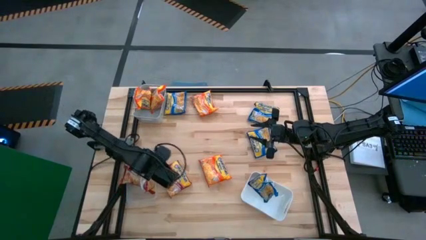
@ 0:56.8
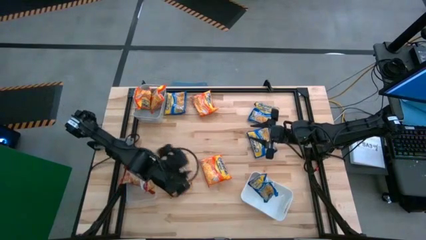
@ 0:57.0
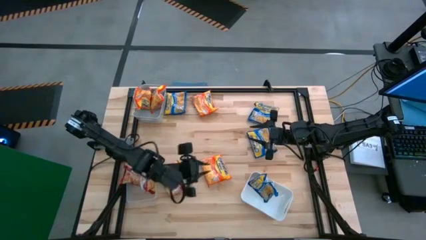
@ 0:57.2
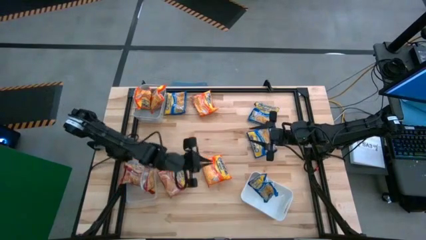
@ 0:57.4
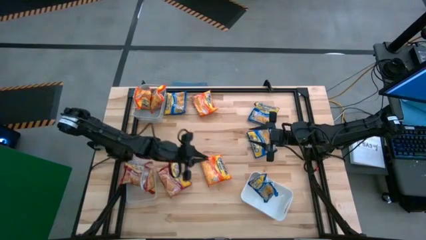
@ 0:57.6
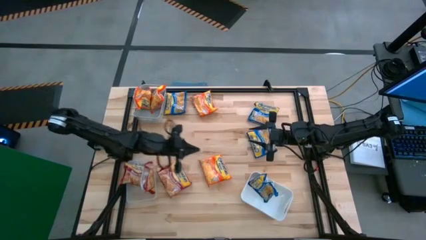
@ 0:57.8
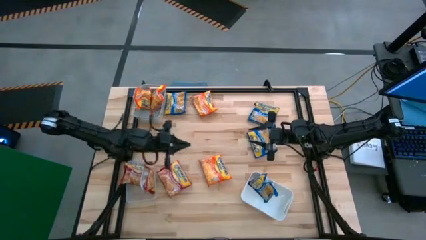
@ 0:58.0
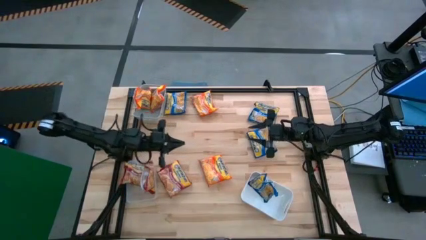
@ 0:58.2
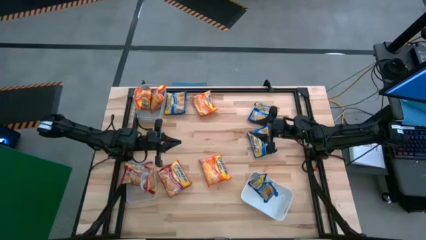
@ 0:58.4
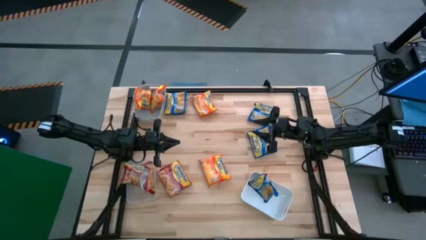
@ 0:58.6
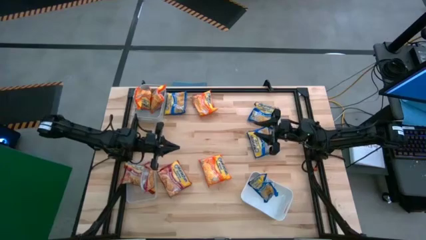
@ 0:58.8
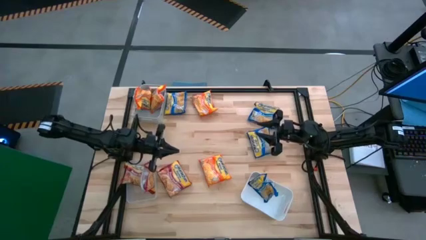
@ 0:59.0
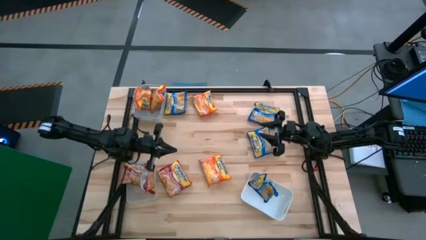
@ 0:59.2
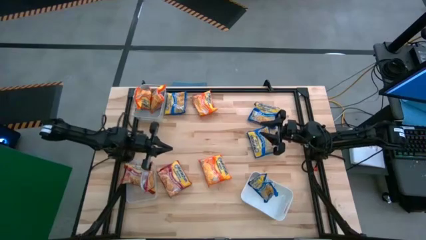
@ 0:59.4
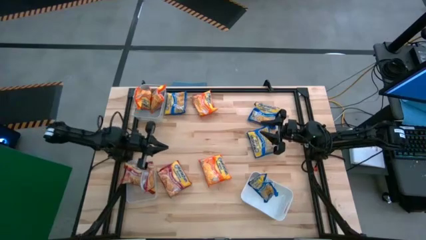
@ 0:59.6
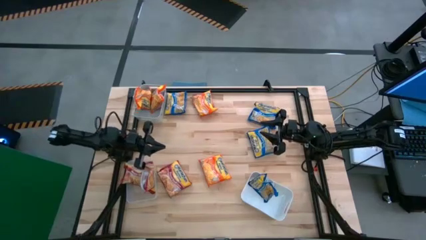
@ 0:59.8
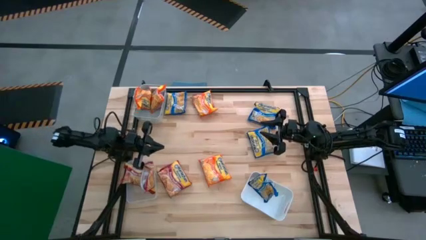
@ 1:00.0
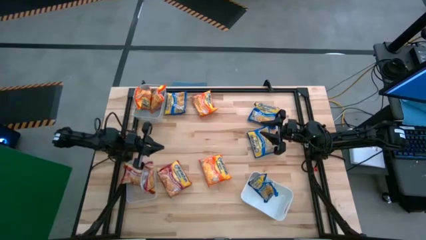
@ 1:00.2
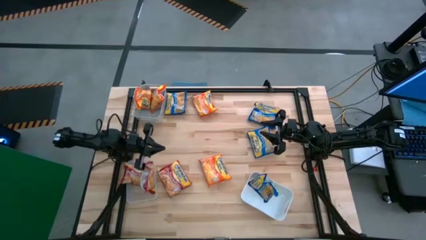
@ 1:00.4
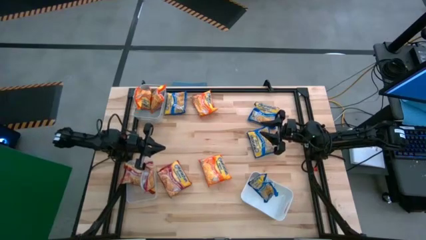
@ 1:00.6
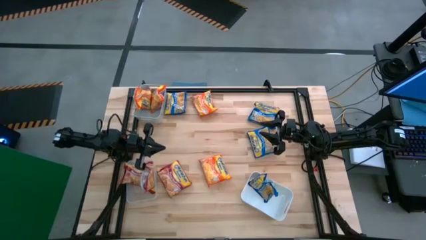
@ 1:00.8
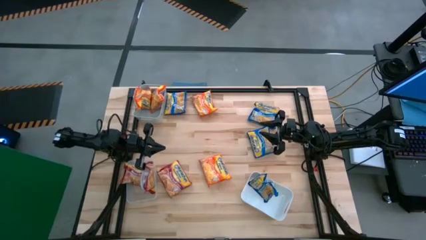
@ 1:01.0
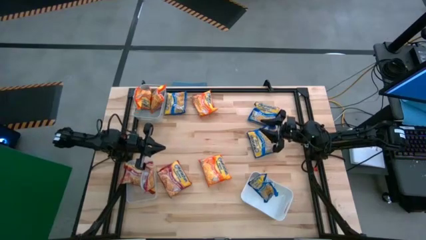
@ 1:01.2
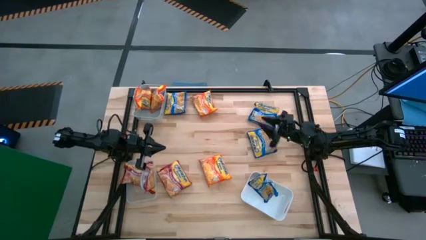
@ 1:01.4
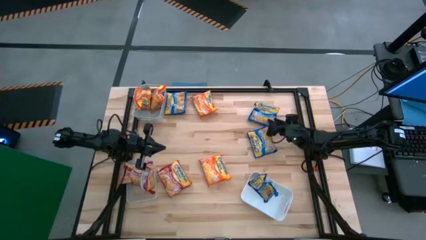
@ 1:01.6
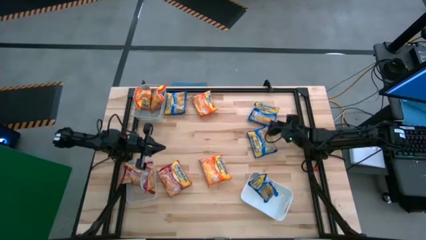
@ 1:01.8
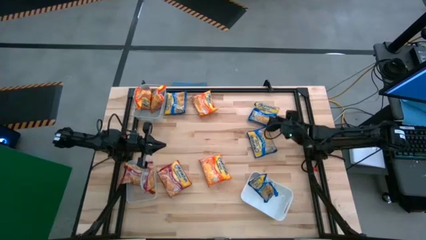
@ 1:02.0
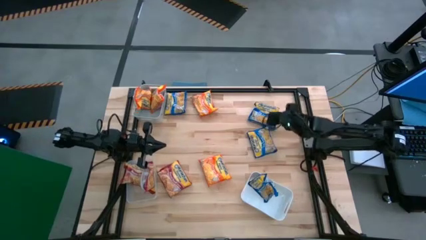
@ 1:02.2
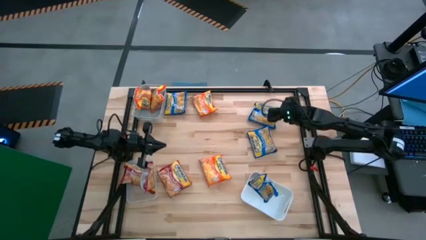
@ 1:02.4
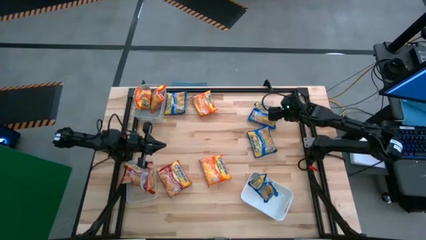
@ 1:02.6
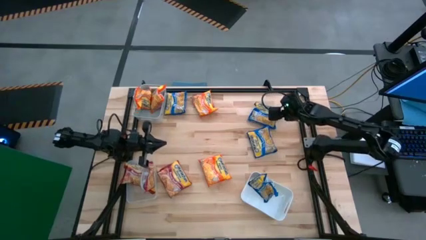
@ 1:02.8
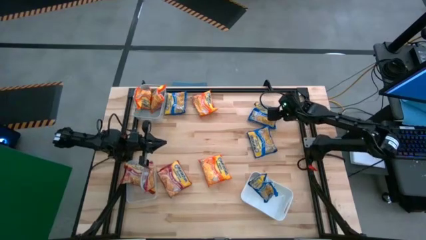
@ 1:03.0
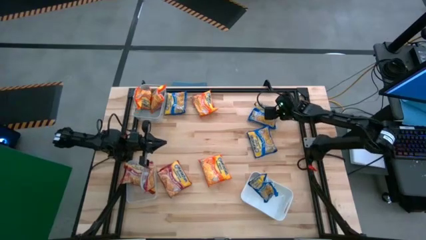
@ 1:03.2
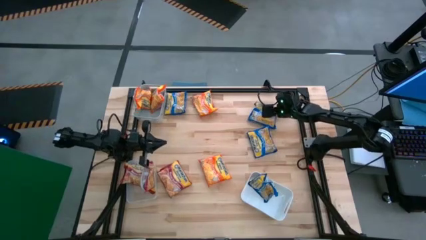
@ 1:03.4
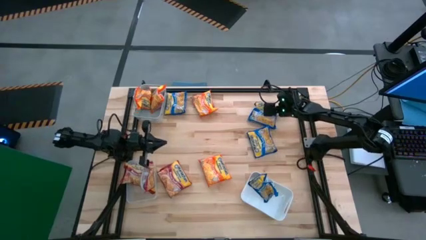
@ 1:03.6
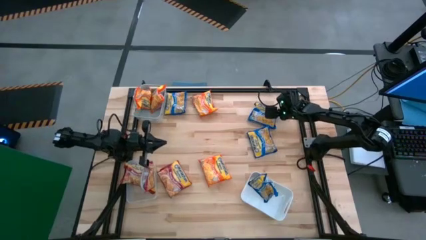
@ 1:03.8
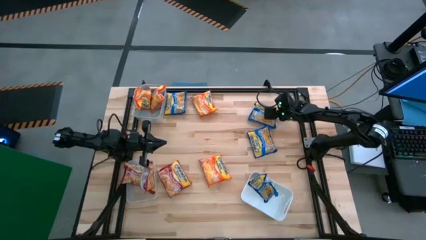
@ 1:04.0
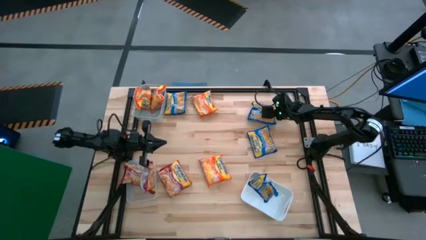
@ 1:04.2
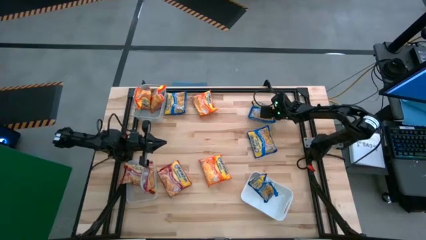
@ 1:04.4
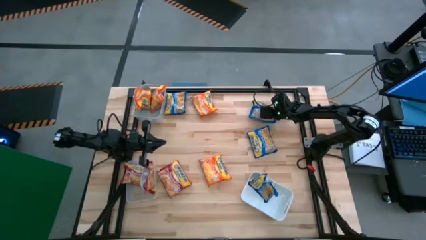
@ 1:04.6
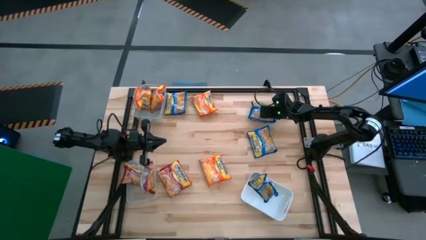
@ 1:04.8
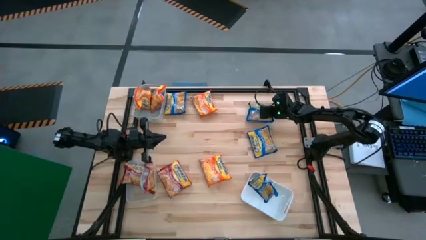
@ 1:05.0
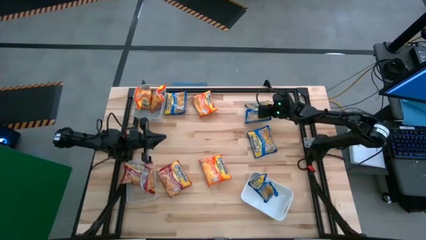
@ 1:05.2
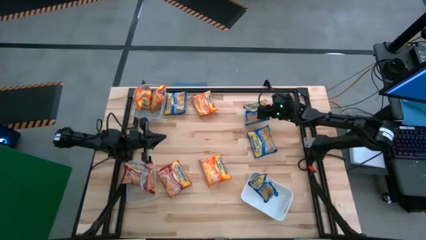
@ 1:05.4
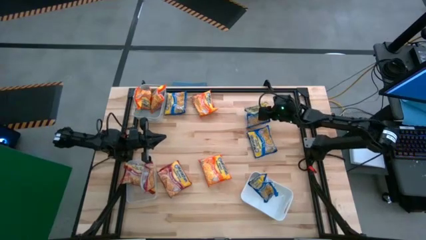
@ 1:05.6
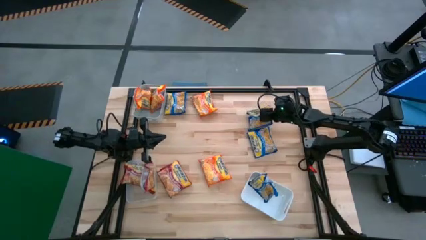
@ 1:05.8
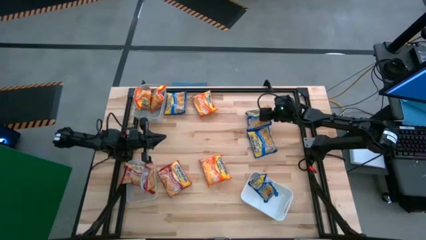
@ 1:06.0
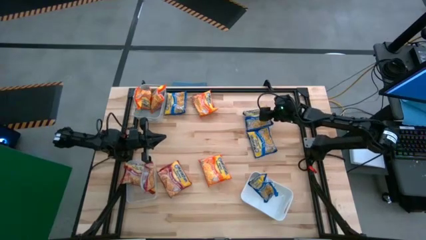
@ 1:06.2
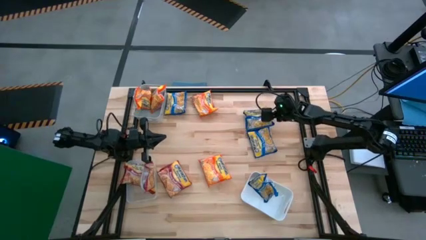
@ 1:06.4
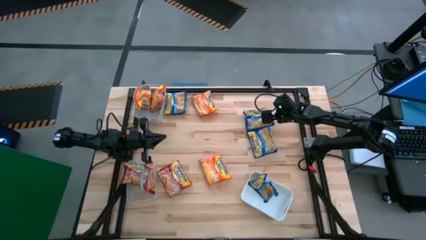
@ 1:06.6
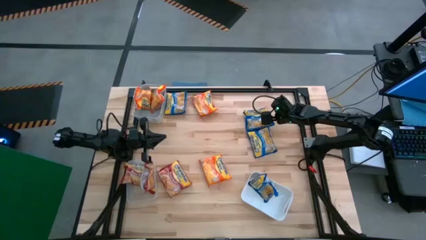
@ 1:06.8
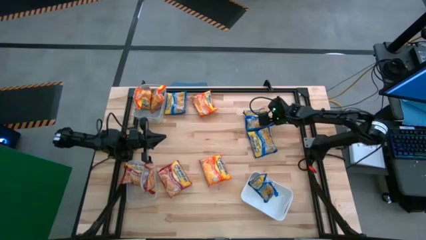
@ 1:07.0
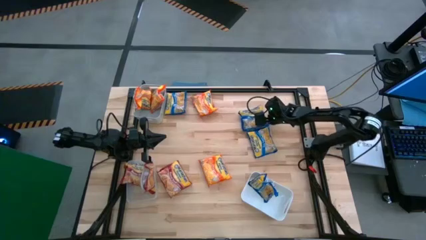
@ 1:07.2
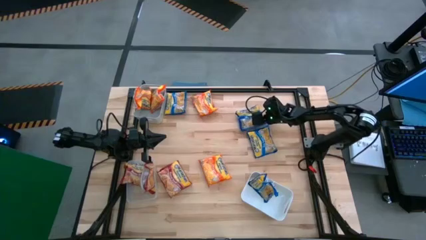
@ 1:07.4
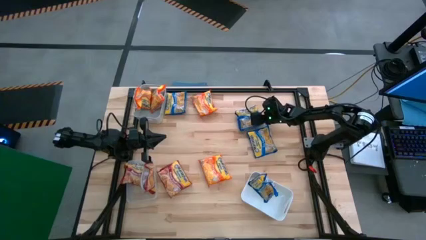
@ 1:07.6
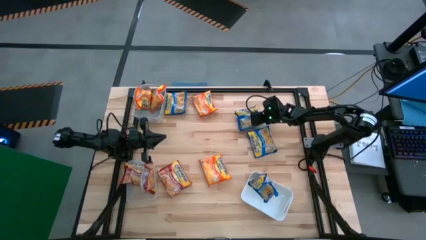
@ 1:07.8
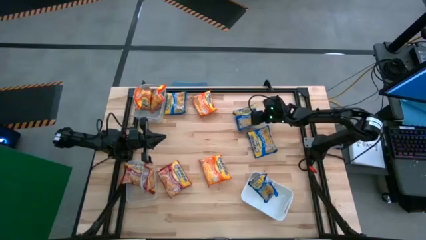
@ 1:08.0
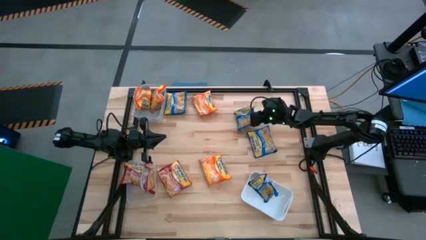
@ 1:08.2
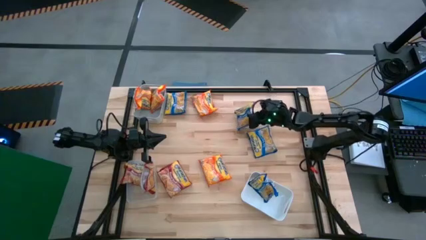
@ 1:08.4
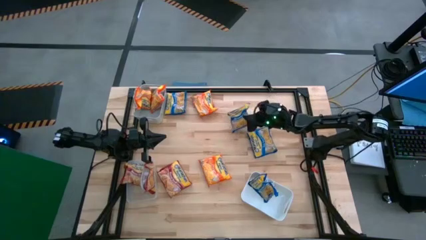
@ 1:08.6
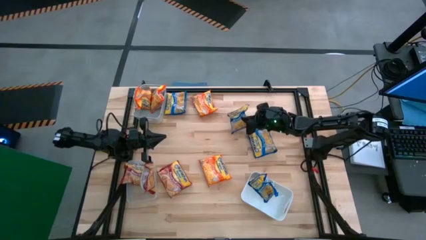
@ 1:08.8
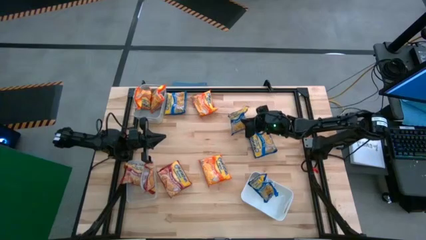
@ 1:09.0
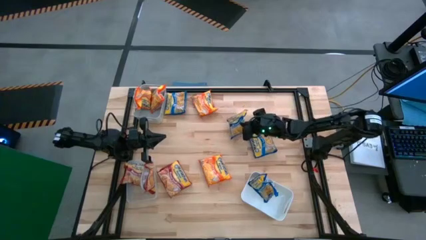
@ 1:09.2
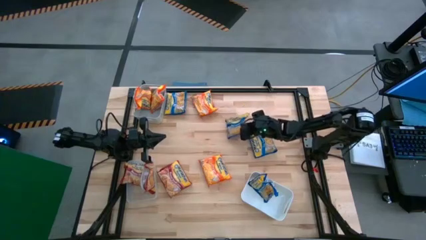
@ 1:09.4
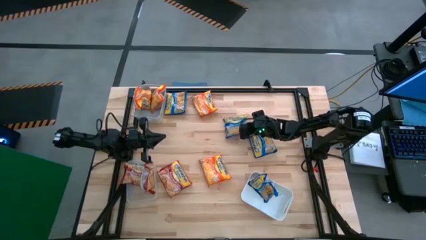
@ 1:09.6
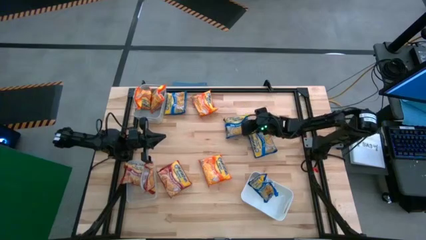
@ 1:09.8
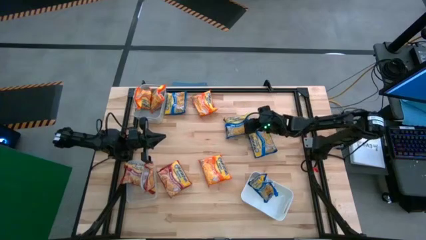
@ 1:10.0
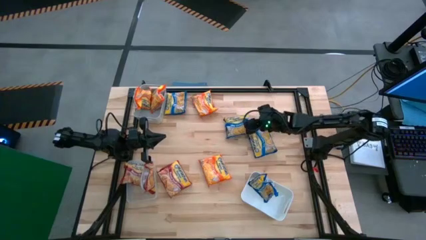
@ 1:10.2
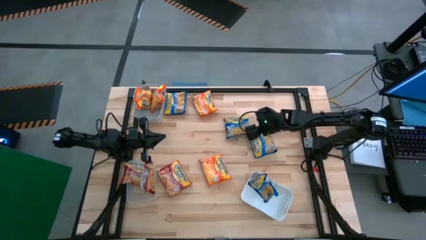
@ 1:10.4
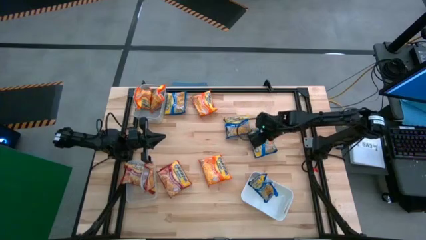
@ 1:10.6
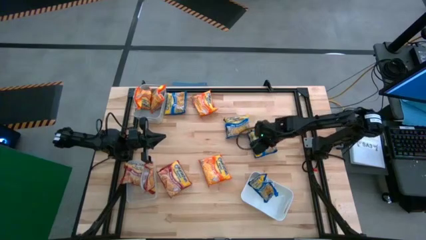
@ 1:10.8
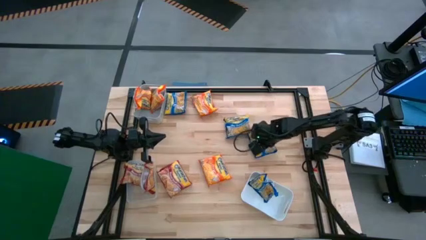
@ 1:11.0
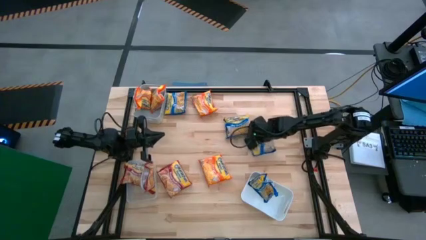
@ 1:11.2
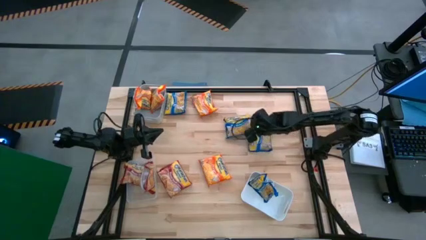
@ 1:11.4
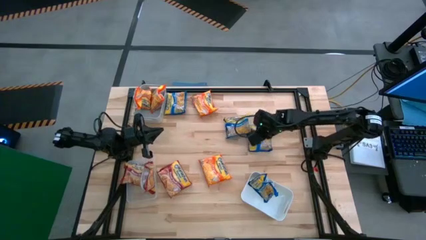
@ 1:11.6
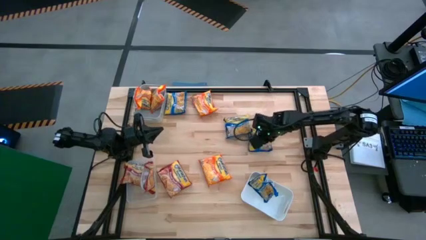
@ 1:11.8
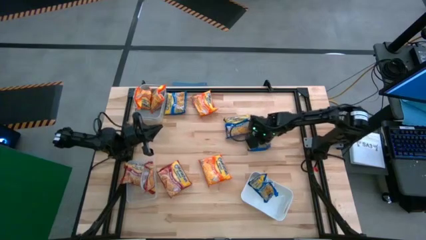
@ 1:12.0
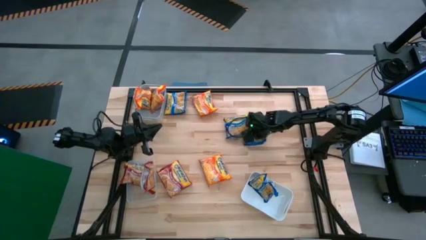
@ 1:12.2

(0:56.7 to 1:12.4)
Task: Sort Maruchan noodles
Put the blue noodle pack into the white bin
